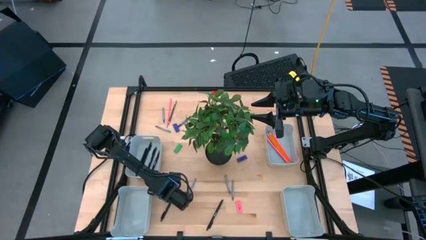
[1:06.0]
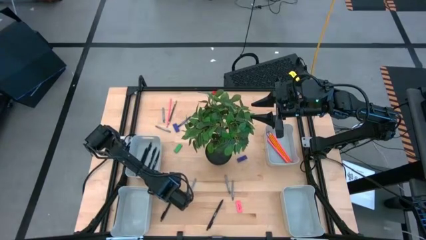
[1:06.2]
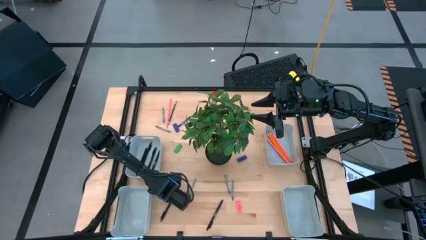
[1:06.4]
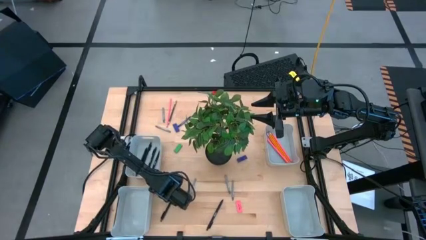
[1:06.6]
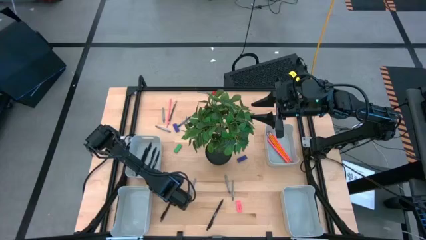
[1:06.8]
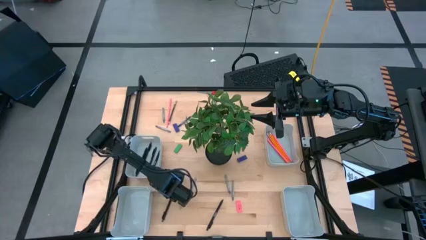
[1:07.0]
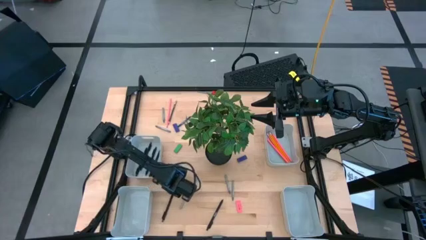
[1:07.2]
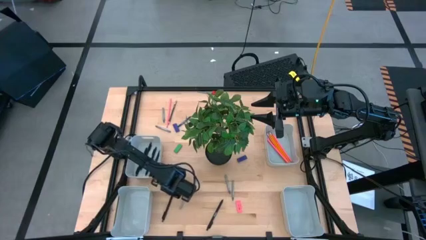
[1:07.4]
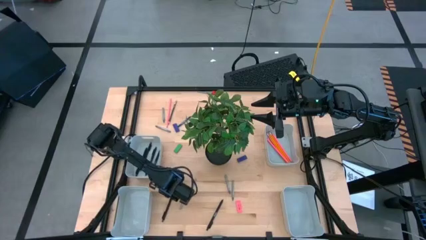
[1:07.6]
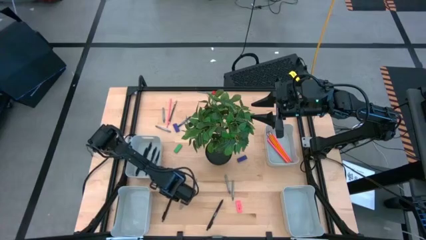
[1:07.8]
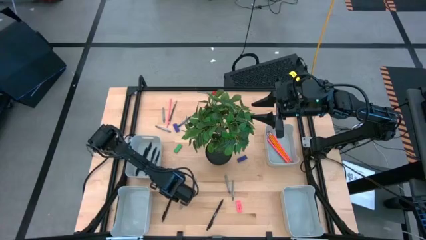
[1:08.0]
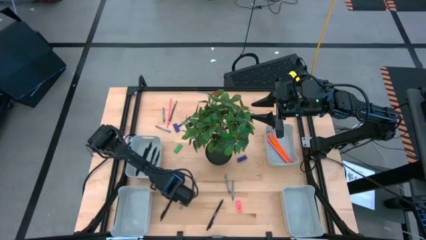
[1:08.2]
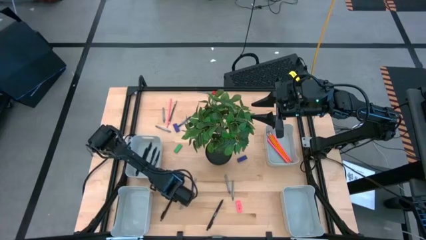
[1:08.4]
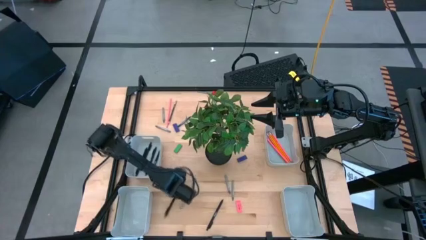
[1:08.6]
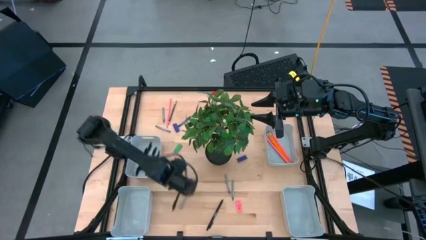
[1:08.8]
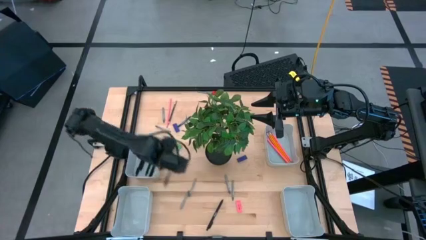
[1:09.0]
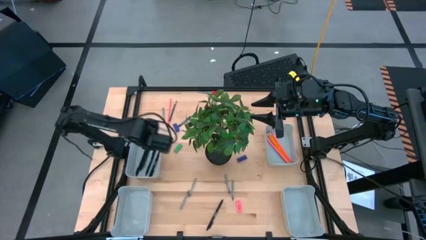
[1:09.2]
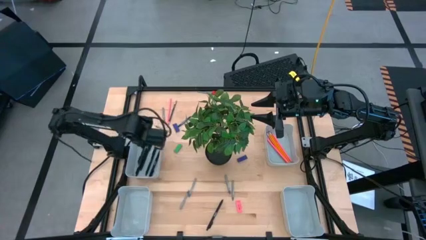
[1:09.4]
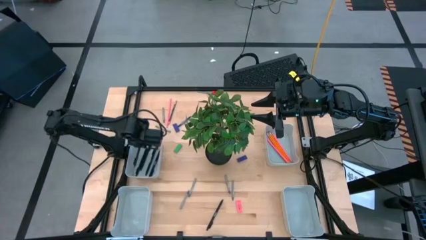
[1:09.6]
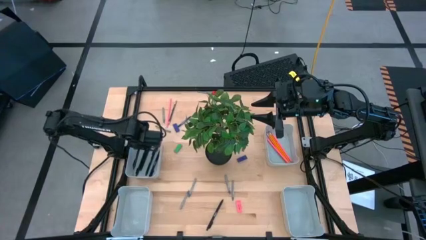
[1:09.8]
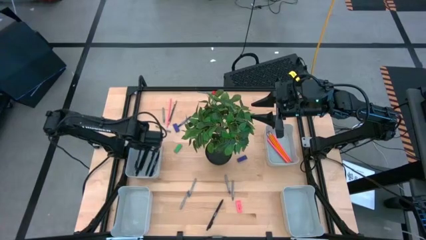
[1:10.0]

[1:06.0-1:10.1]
Task: Sort crayons/erasers/pens/pencils in bins
Put the black pen into the top left gray bin

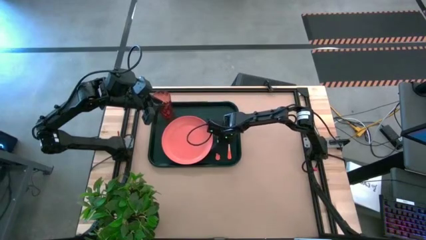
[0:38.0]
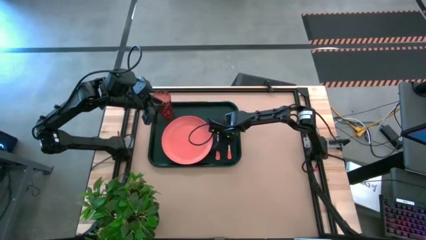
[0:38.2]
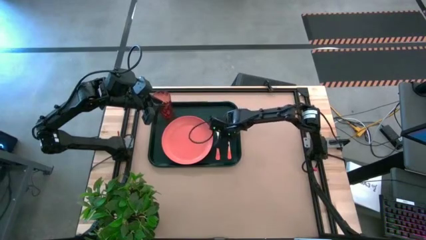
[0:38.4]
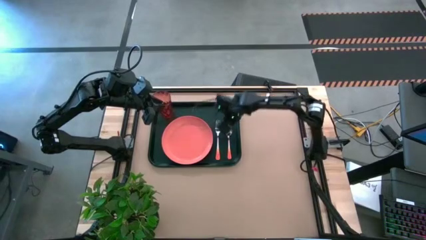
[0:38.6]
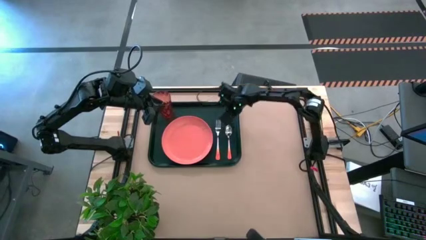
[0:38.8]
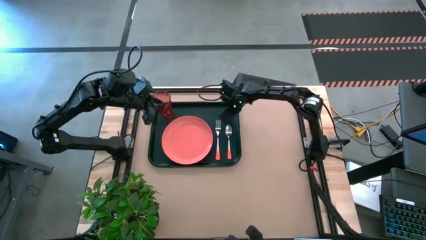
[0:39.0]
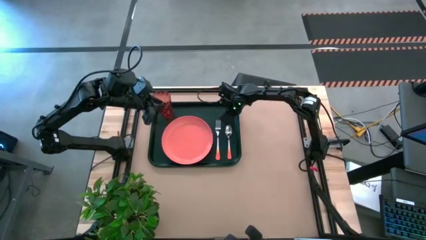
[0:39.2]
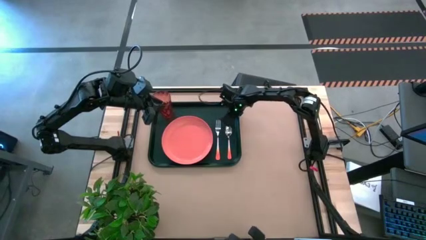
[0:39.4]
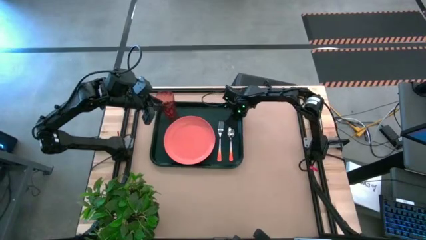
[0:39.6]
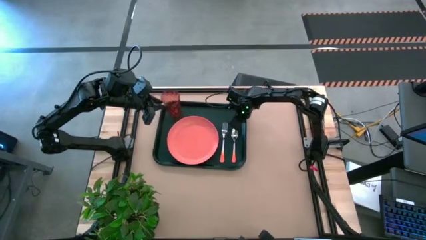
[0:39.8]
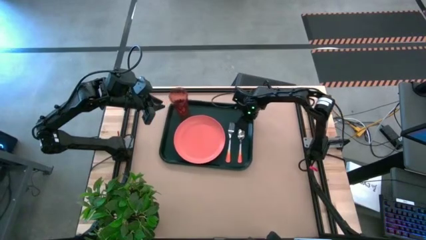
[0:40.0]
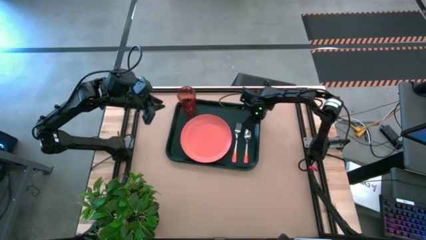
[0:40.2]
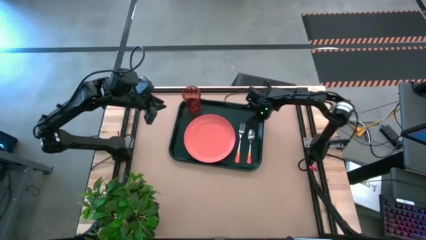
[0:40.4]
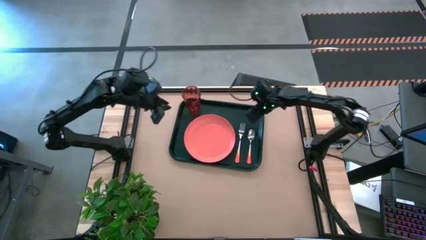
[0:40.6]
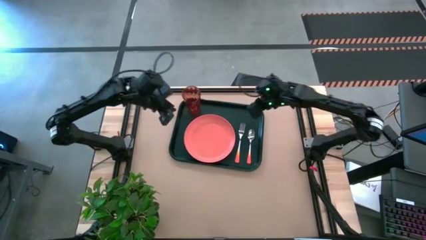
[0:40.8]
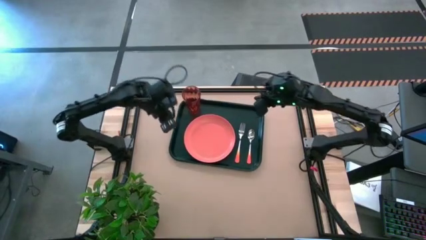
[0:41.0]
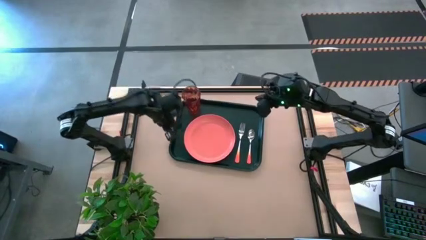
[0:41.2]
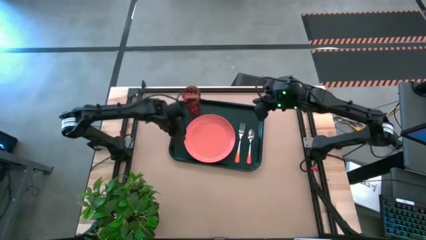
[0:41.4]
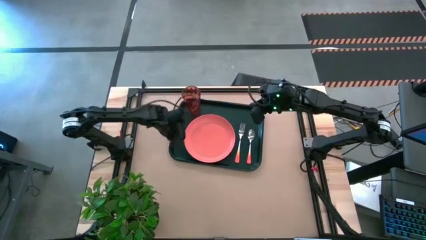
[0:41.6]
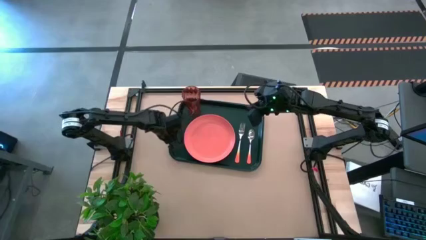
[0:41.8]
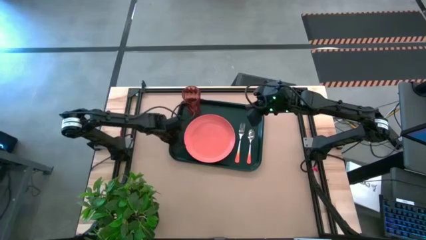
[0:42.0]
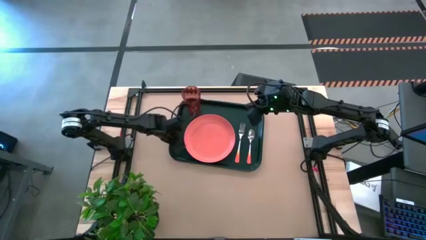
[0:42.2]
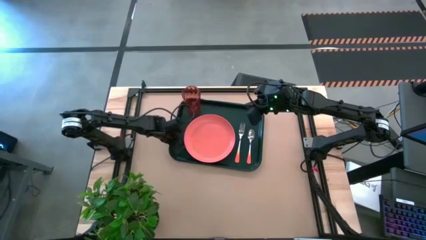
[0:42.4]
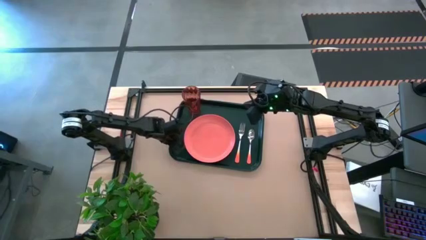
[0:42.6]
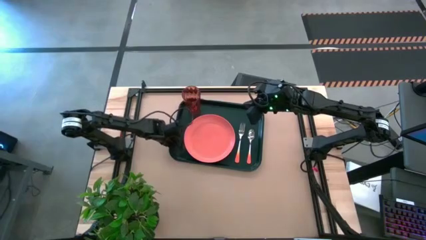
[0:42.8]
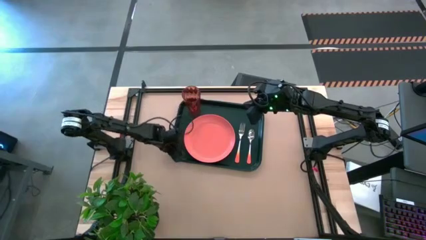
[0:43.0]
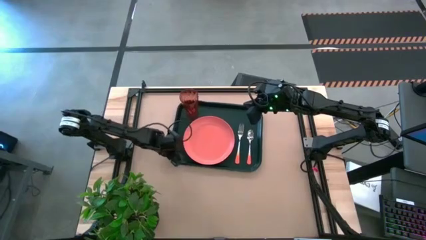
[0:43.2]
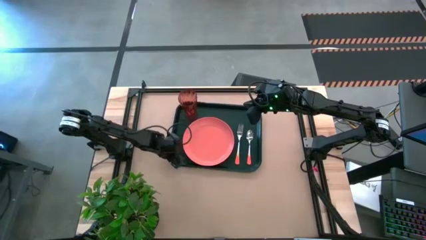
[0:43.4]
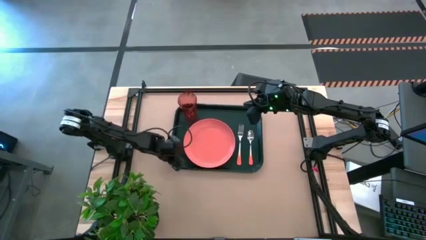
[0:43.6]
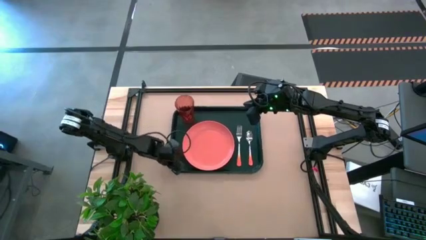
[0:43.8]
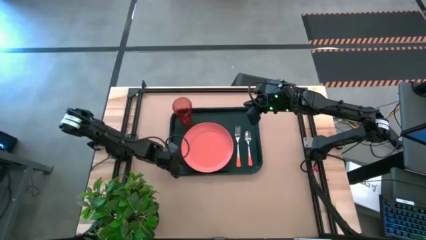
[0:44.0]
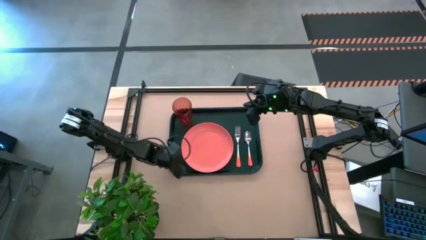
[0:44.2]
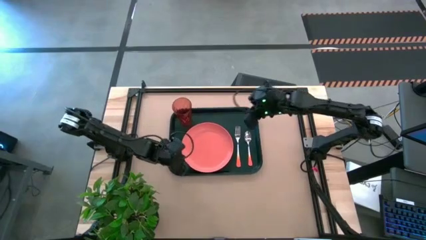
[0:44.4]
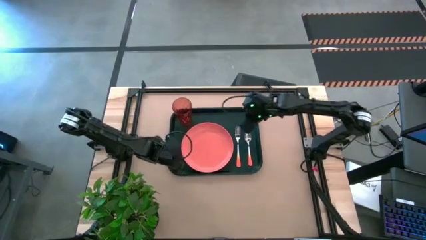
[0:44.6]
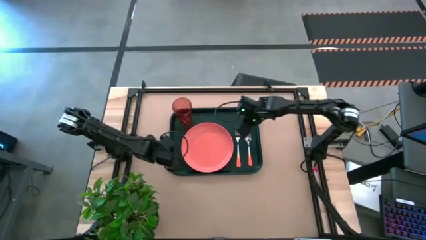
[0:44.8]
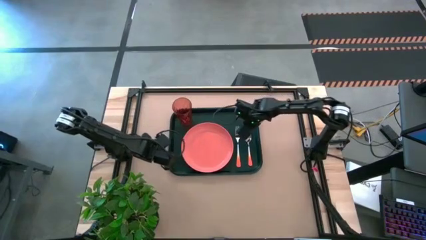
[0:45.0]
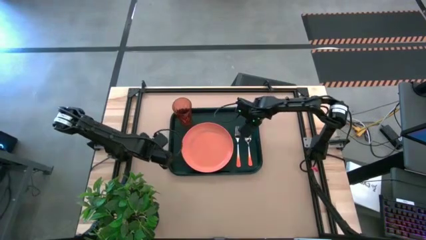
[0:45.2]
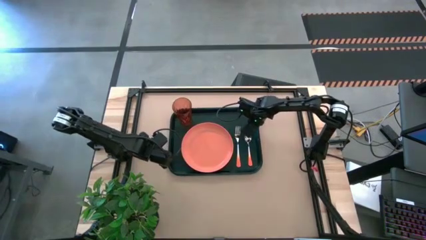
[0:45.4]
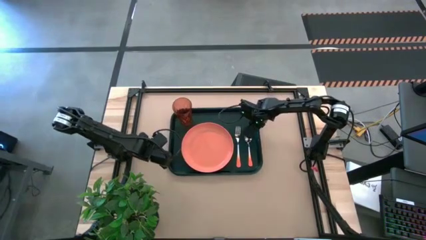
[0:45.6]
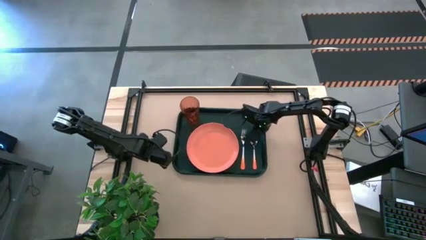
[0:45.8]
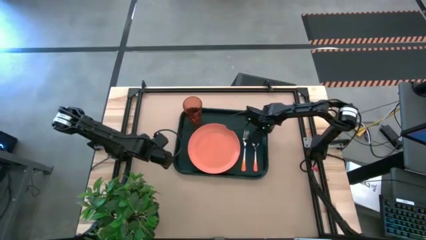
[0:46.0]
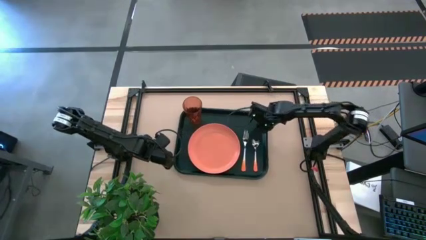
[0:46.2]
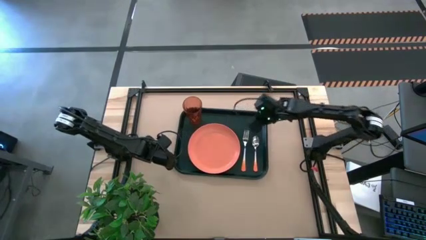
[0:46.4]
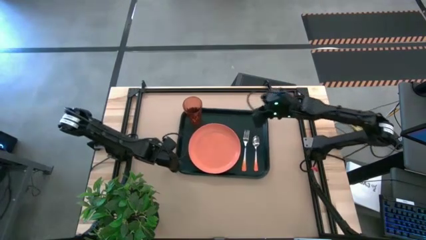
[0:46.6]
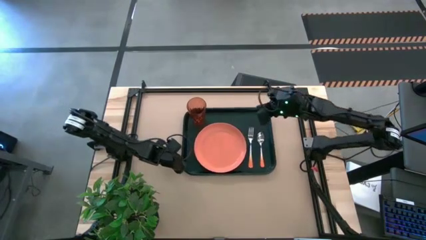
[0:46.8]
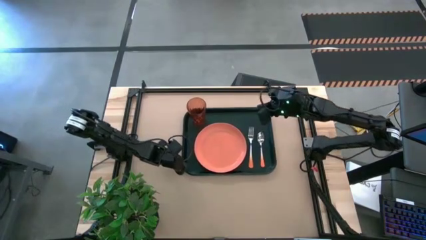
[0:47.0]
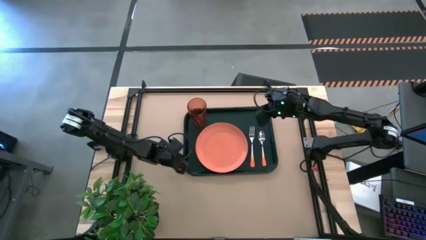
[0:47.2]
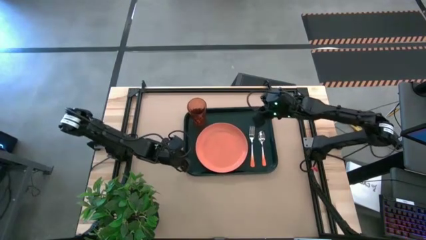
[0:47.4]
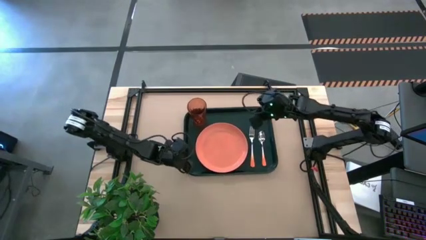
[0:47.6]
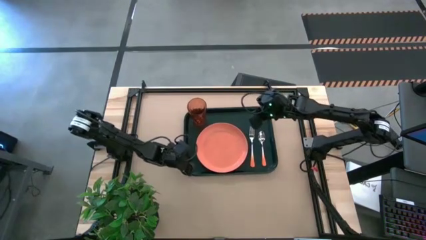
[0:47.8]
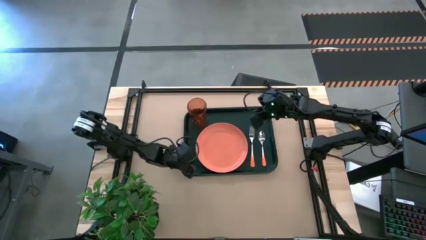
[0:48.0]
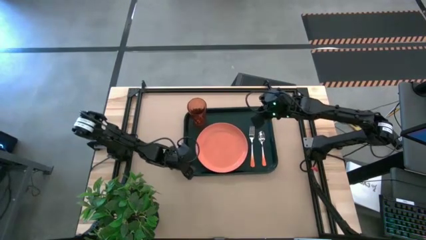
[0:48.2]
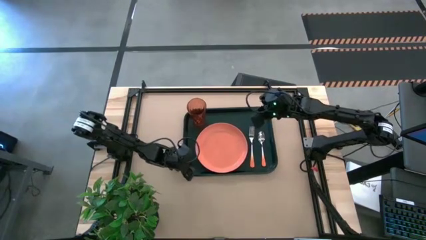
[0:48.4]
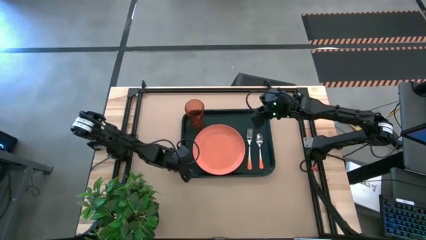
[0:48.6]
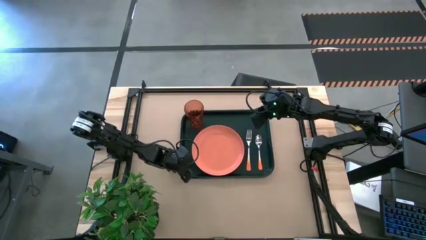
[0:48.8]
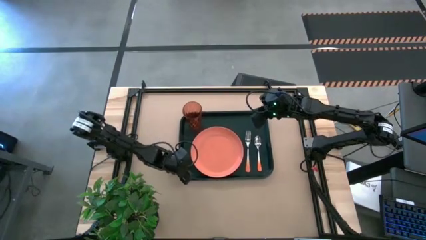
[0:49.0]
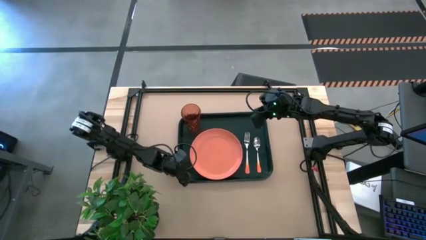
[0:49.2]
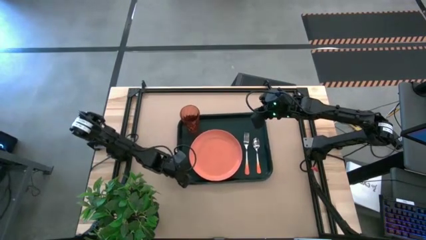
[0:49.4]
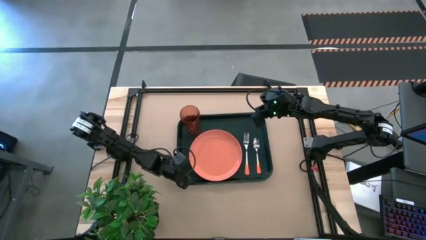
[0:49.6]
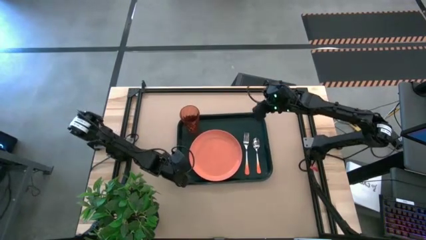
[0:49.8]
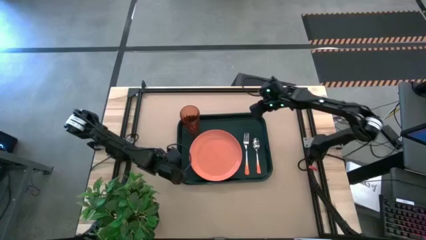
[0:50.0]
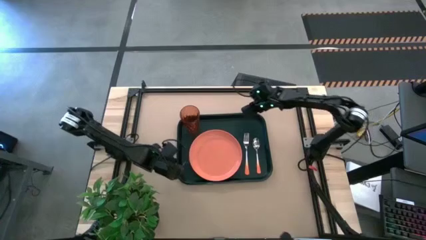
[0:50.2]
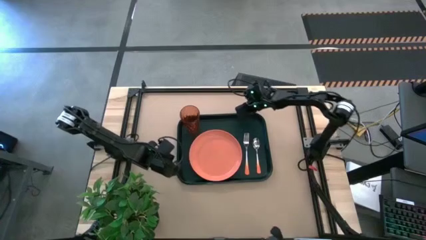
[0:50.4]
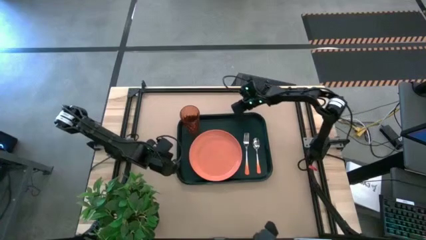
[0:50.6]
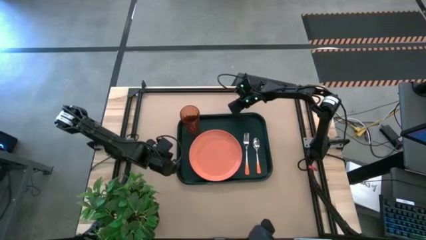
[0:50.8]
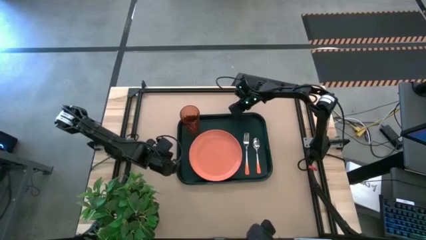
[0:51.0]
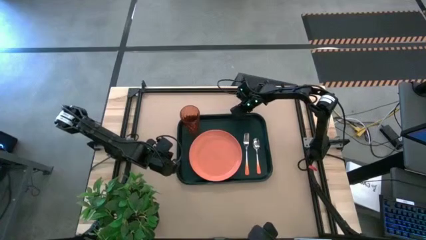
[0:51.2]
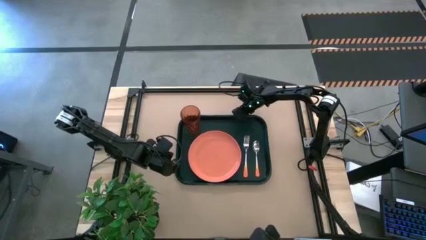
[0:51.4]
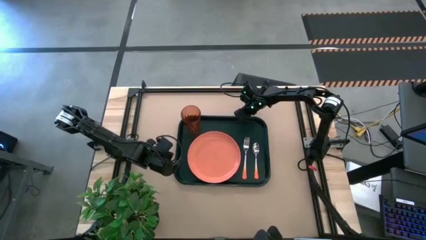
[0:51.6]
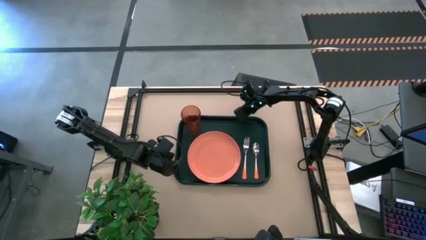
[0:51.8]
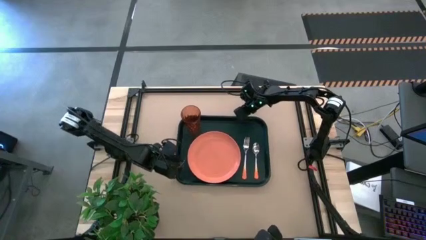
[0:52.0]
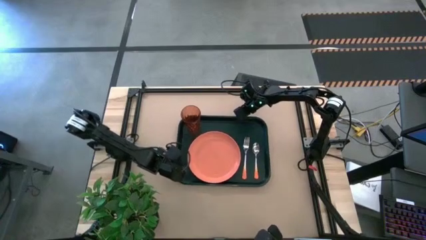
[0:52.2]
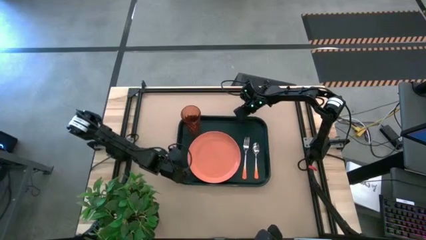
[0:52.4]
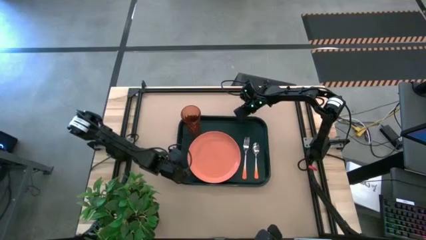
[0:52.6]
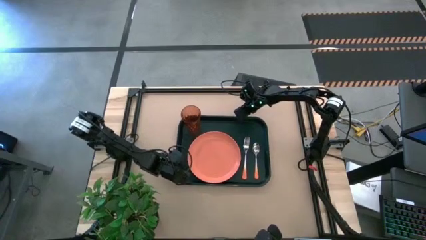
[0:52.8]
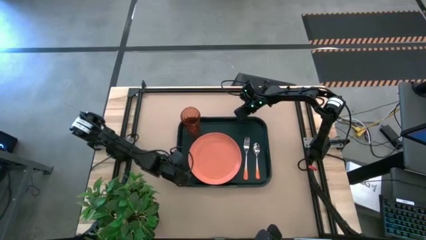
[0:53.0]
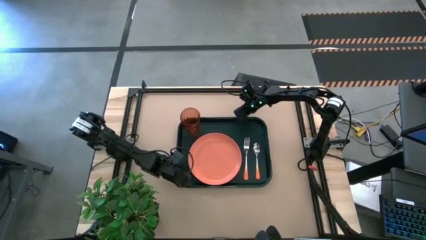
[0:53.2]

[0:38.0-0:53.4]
Task: Pick and place plate/cup/fork/spoon on tray
Adjust the black table tray
